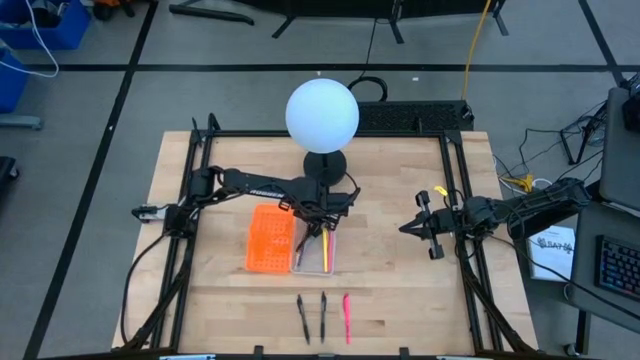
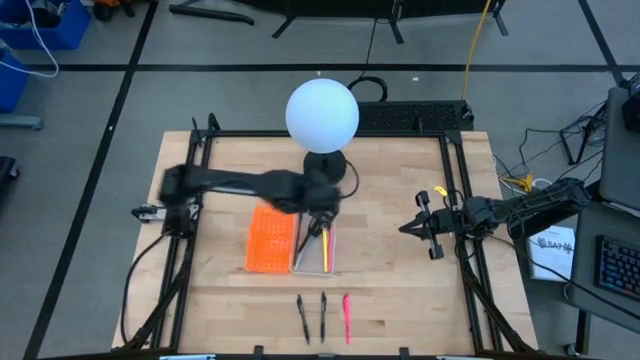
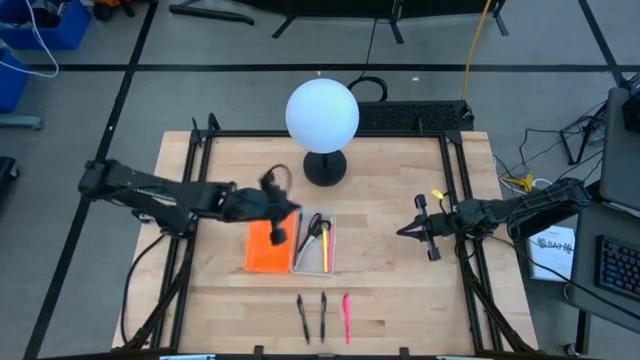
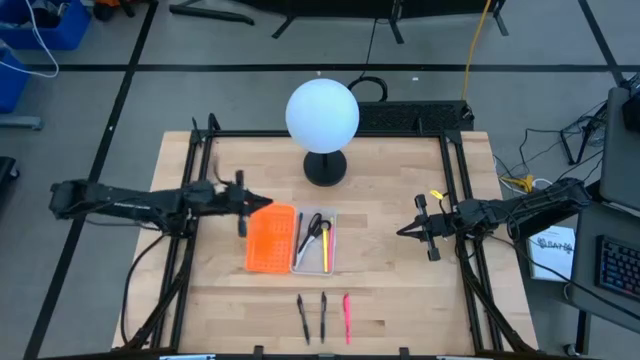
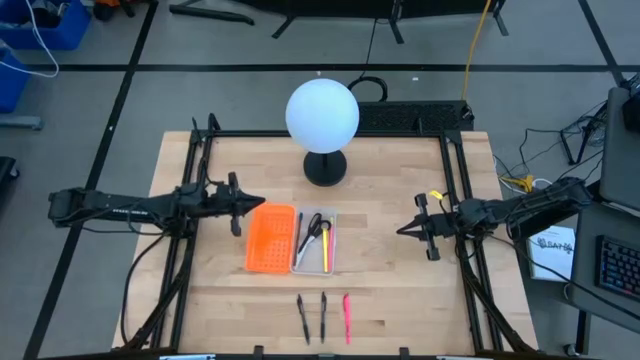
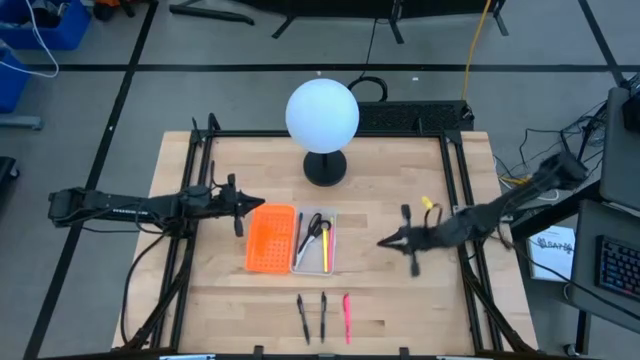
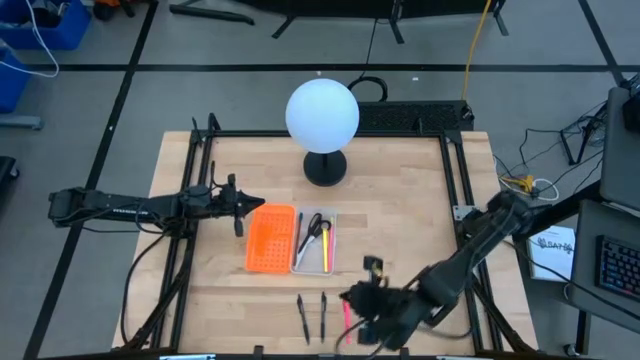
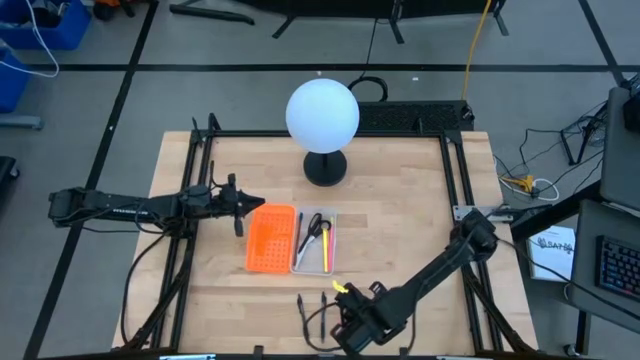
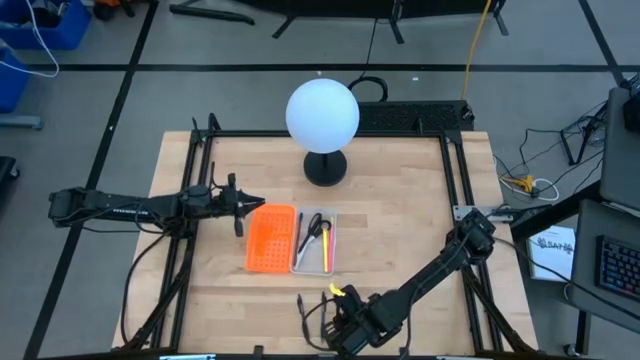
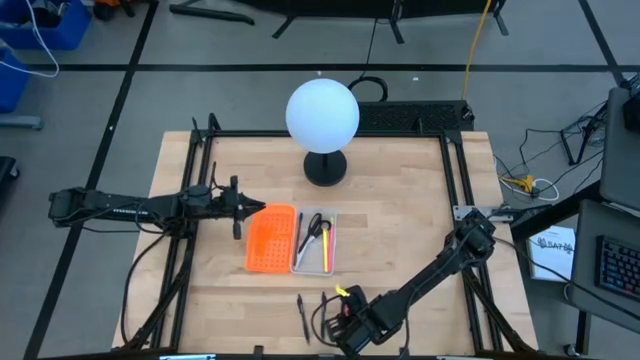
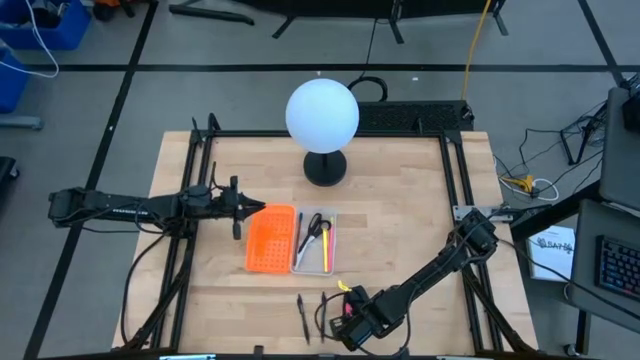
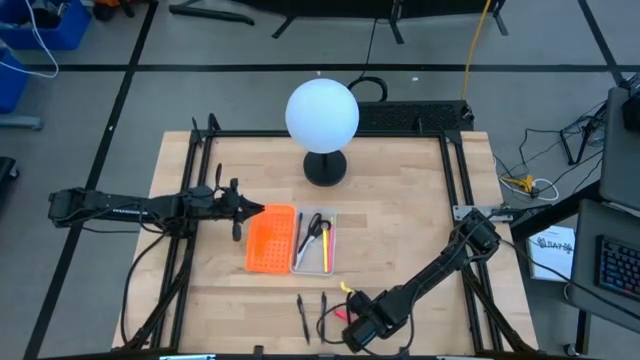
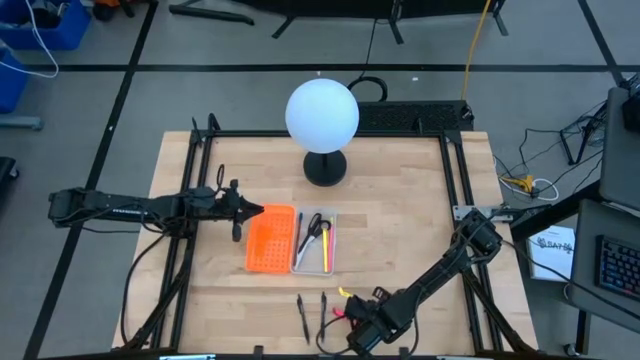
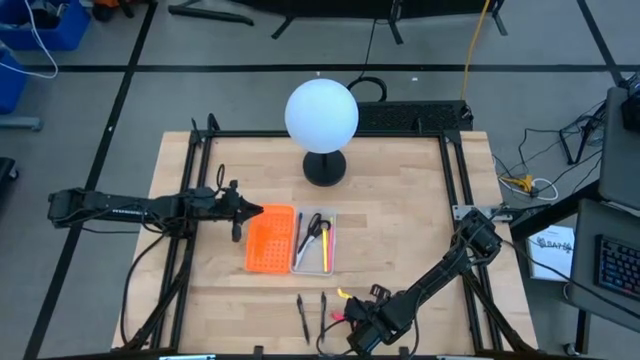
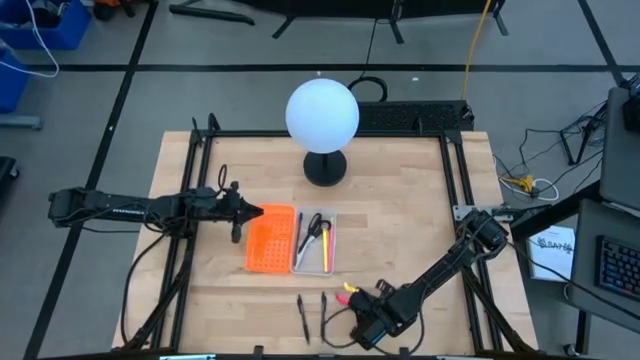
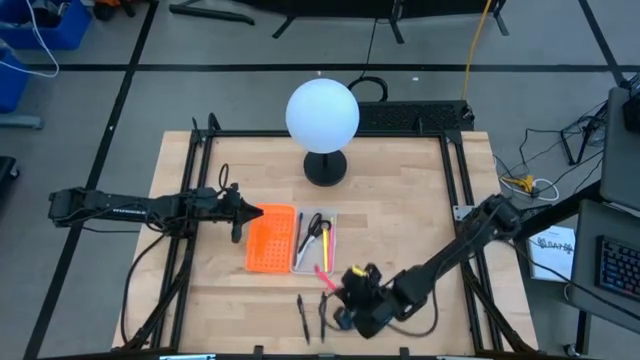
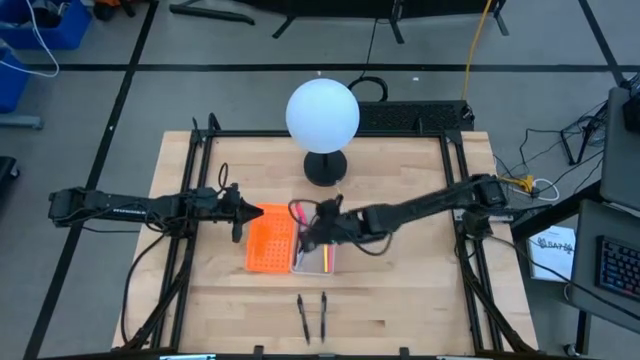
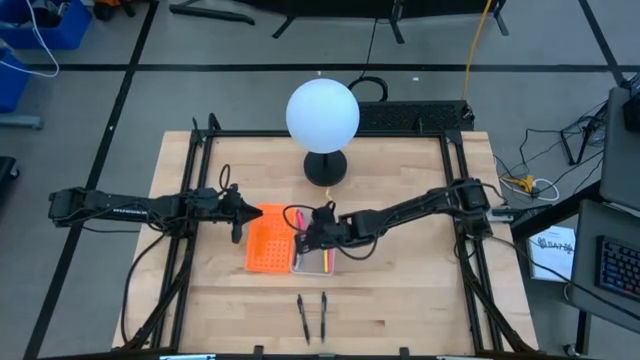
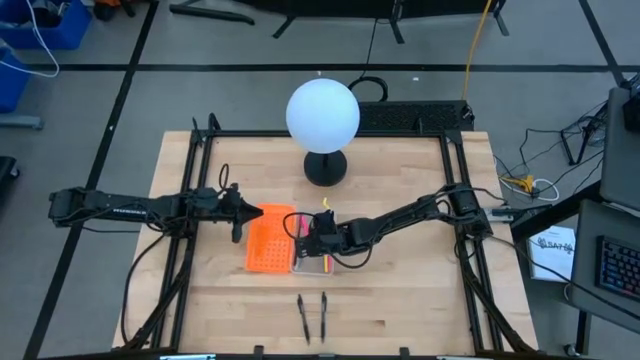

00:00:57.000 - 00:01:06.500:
Task: Pick & place school supplies into a supply box
Put the pink pen into the orange supply box

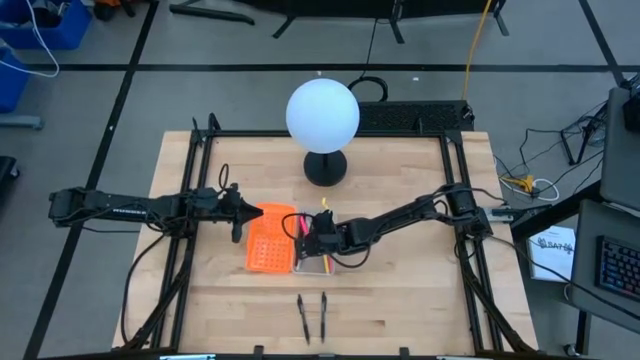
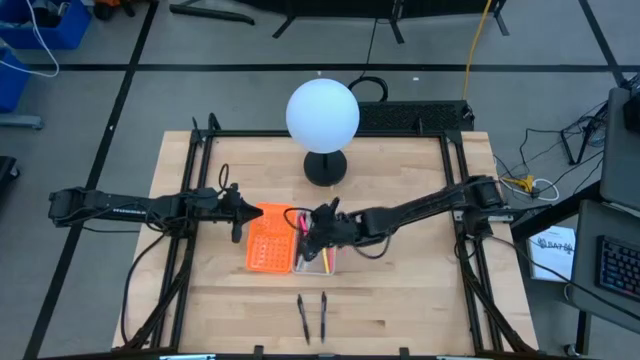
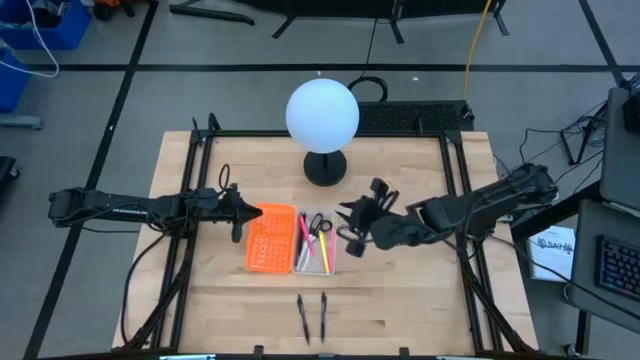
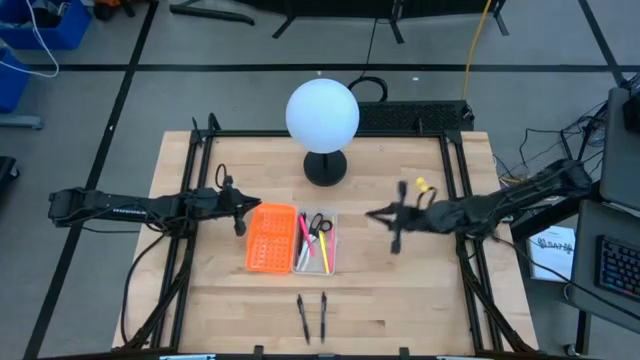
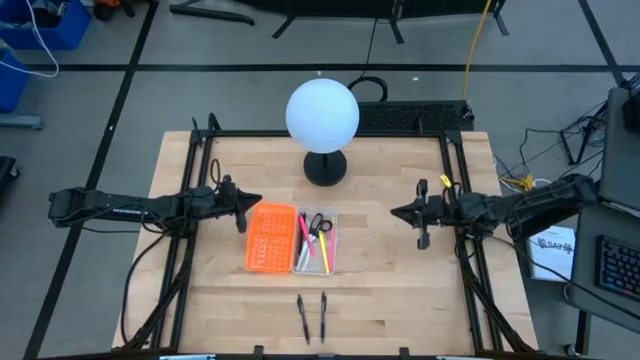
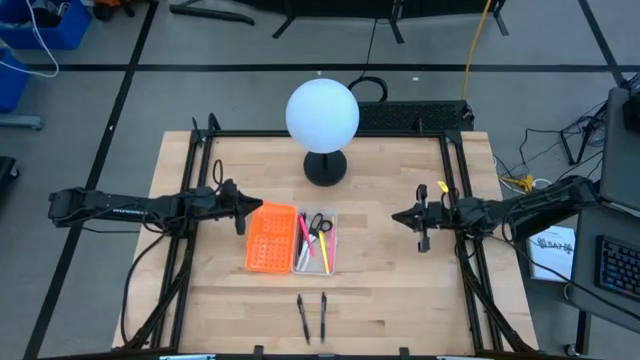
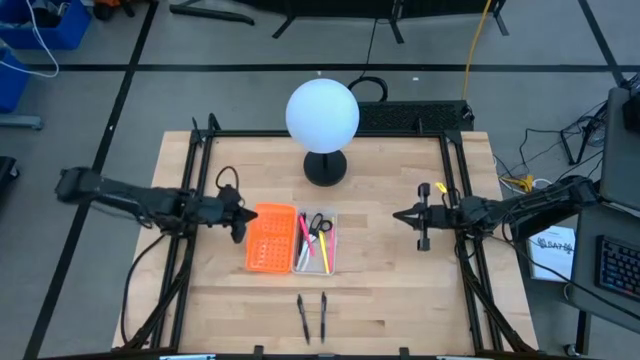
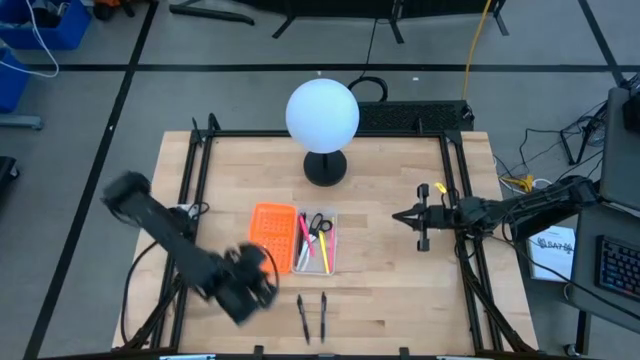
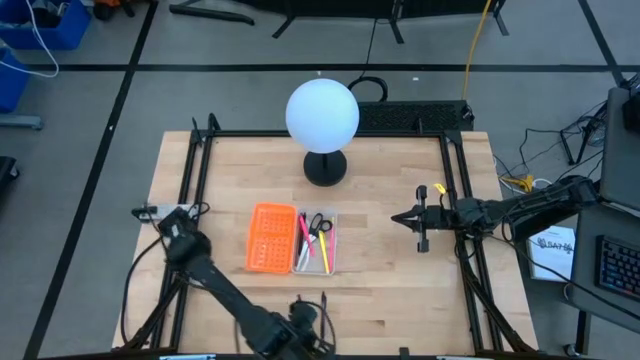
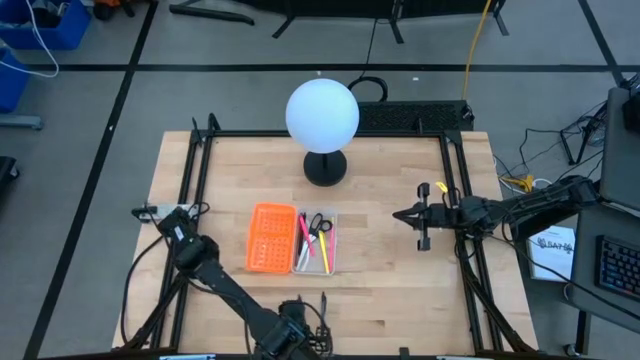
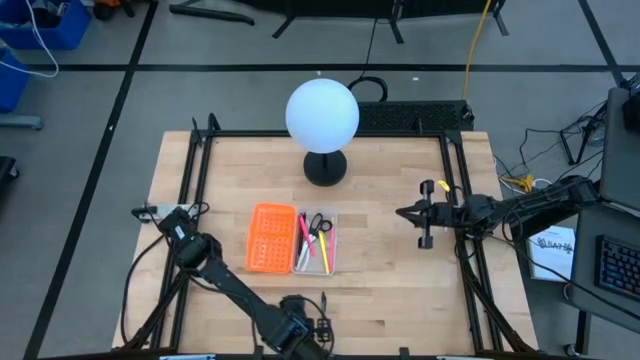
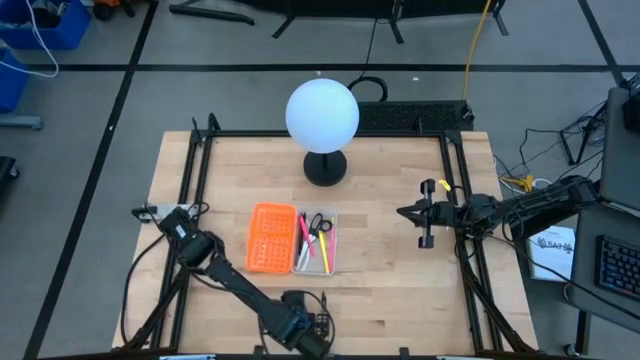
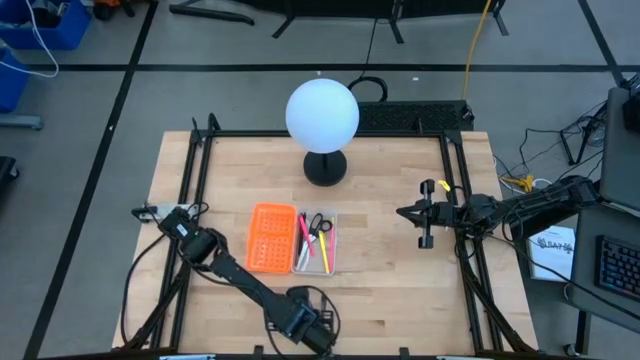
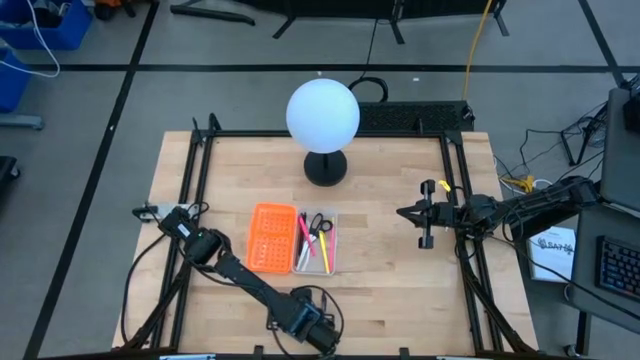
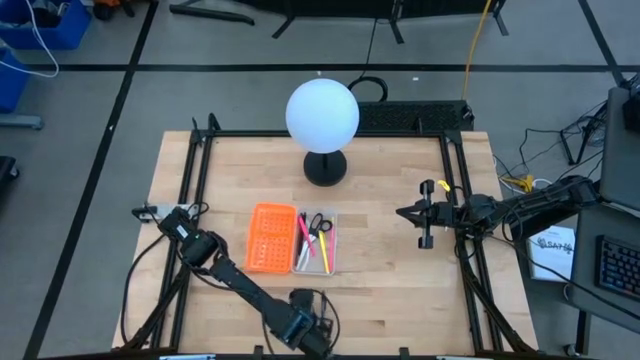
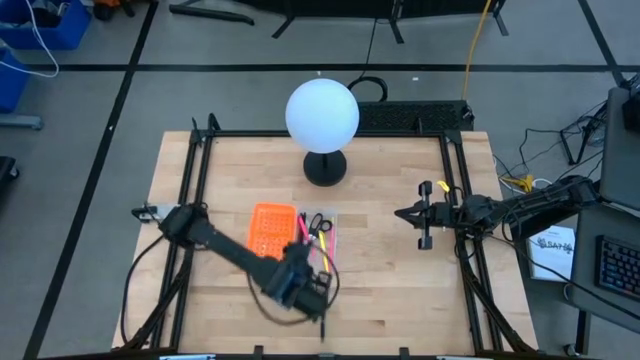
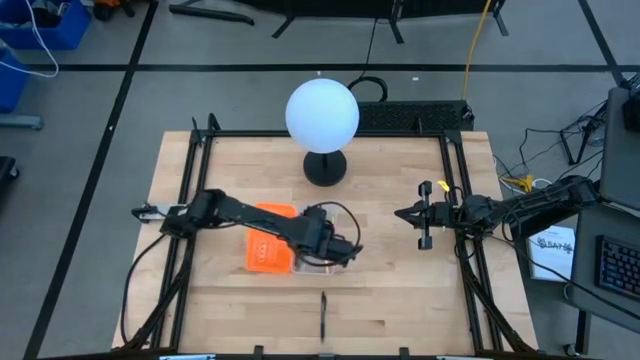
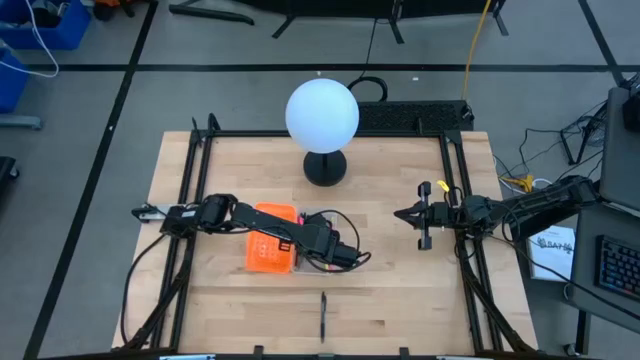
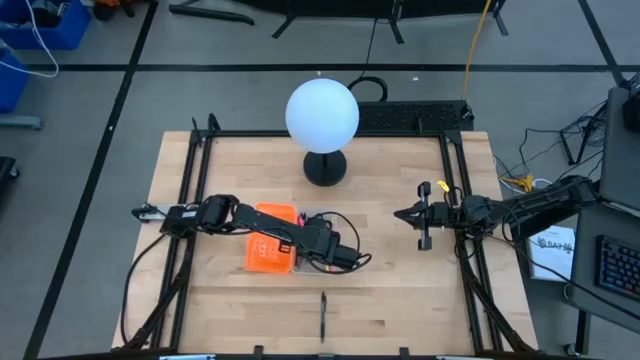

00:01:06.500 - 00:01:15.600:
Put the left black gel pen into the orange supply box

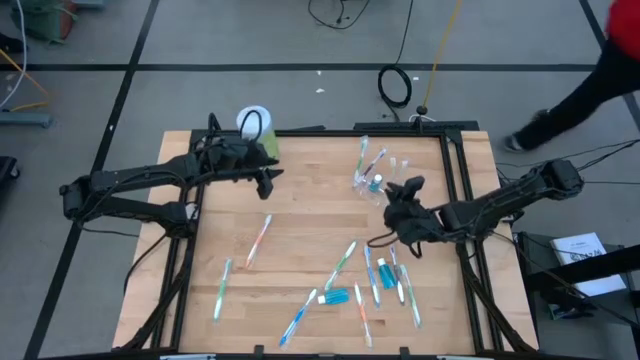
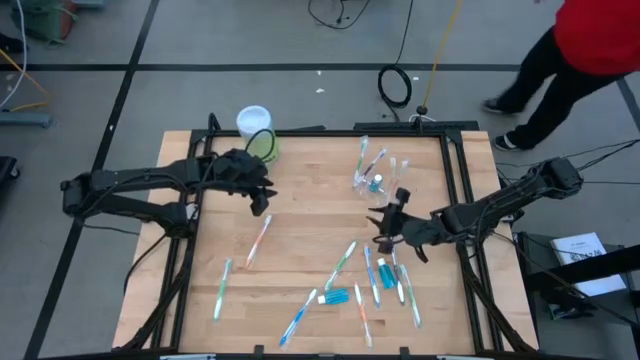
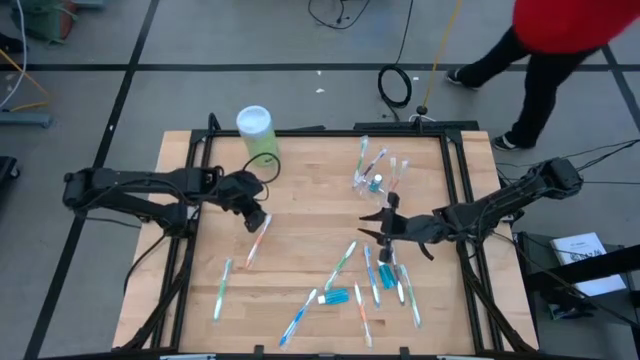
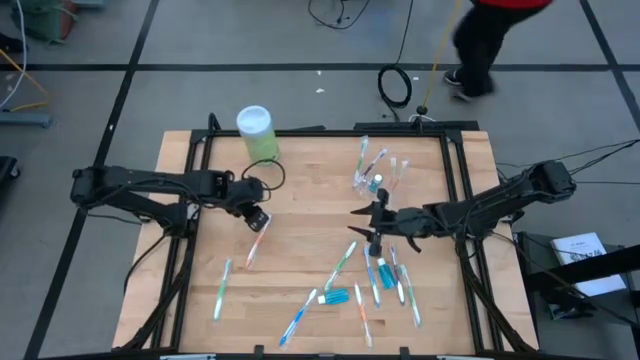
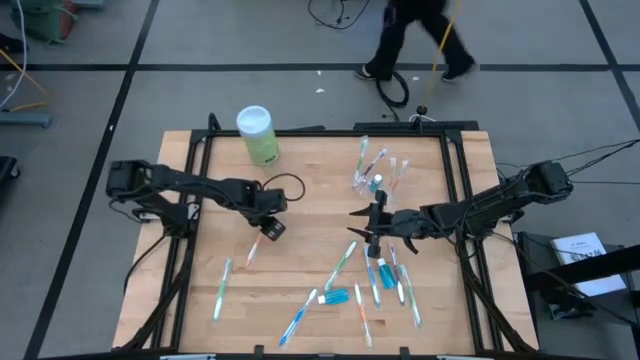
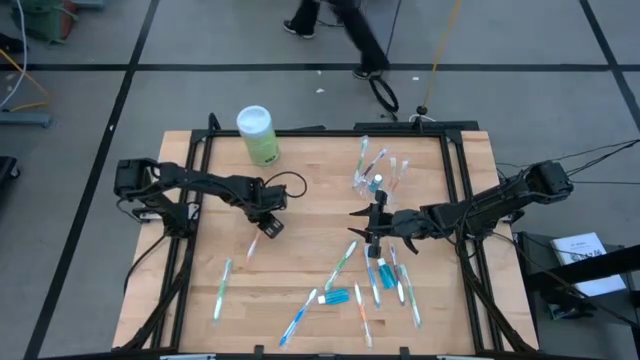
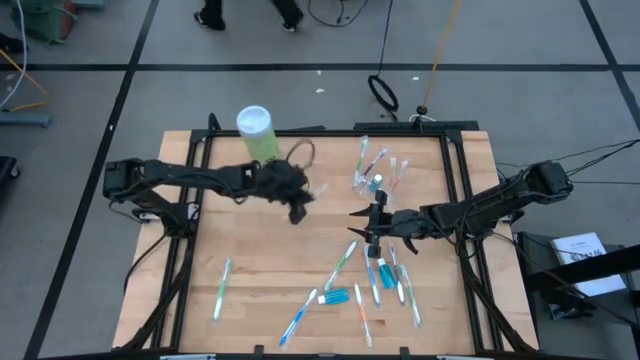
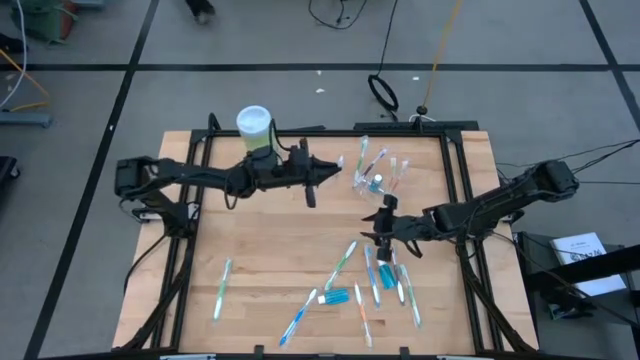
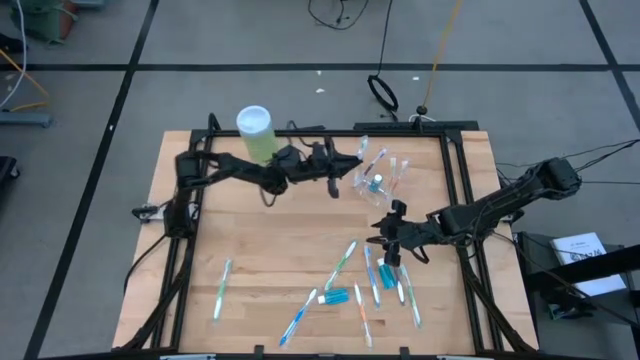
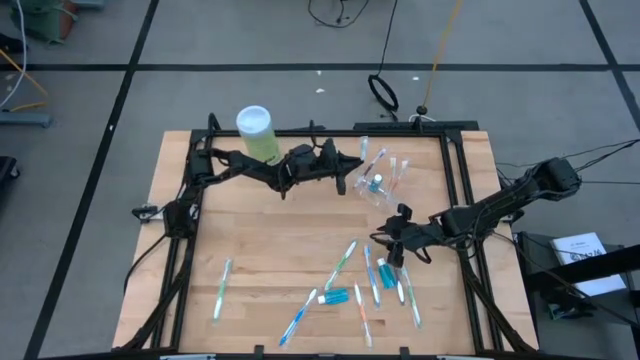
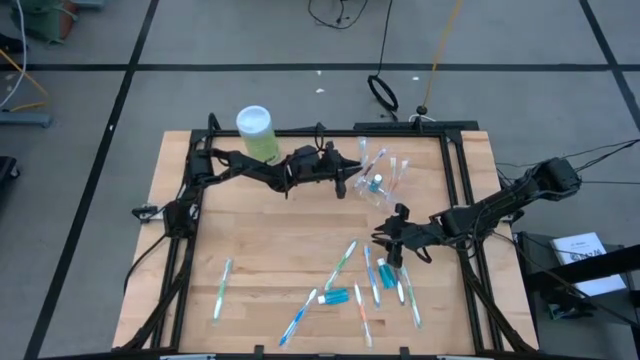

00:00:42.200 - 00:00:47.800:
Task: Pick & Place toothbrushing station
Put the orange toothbrush into the transparent organizer
